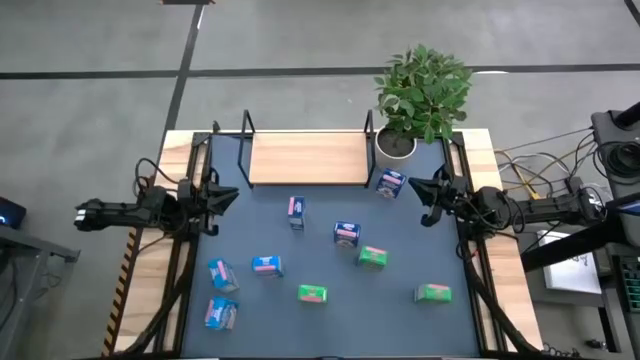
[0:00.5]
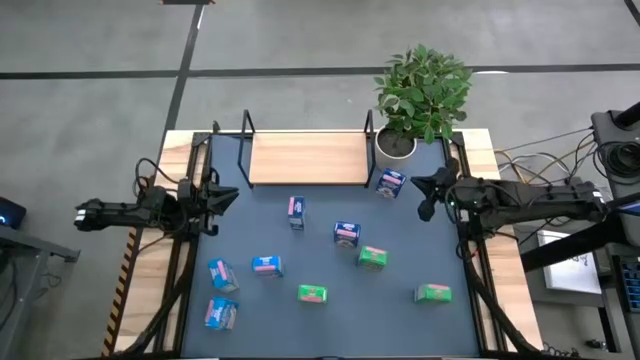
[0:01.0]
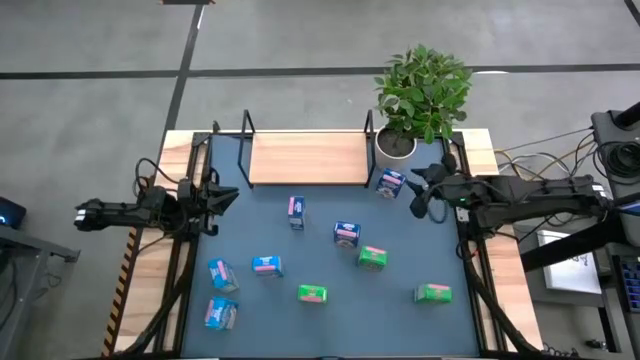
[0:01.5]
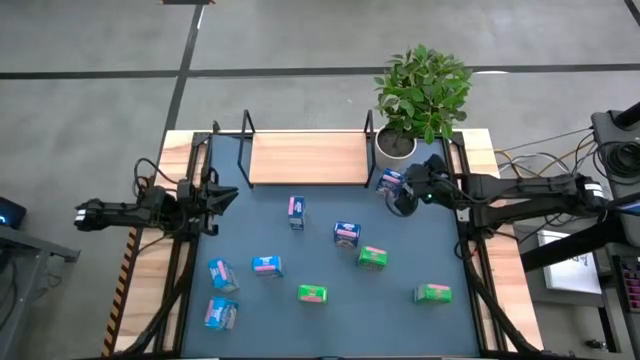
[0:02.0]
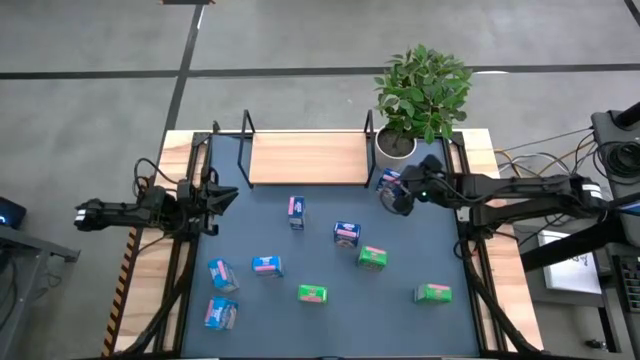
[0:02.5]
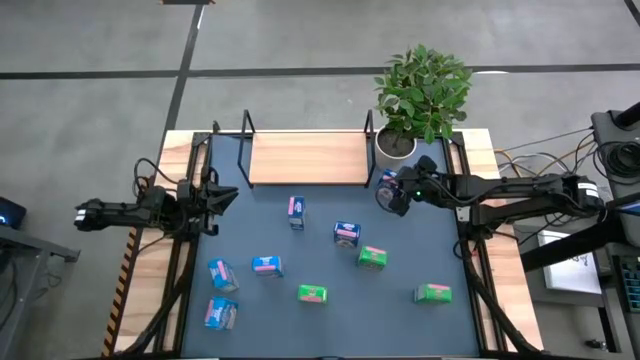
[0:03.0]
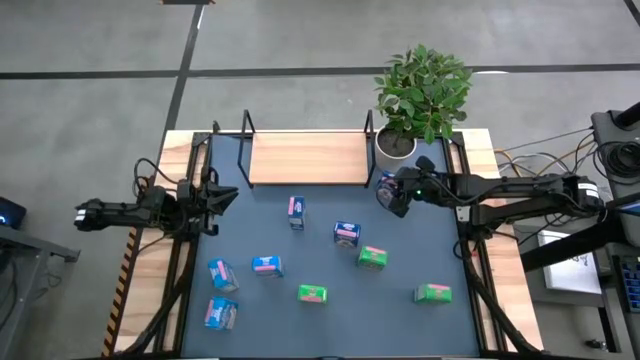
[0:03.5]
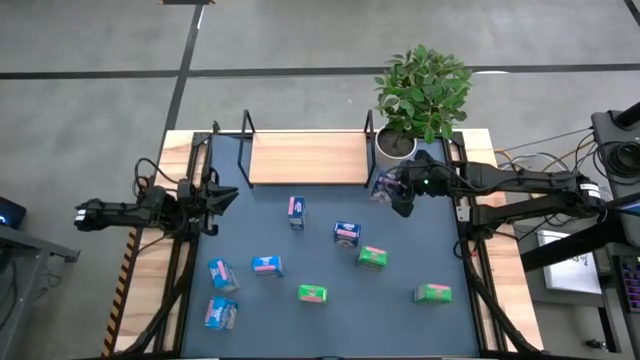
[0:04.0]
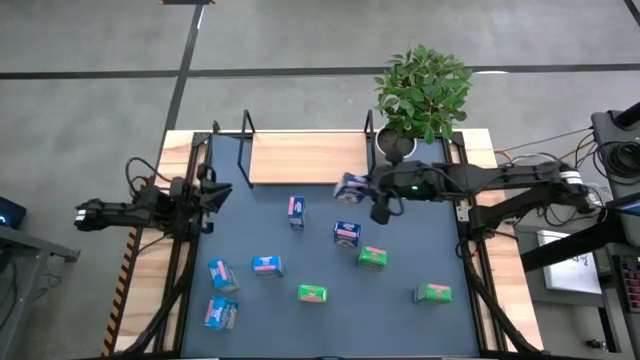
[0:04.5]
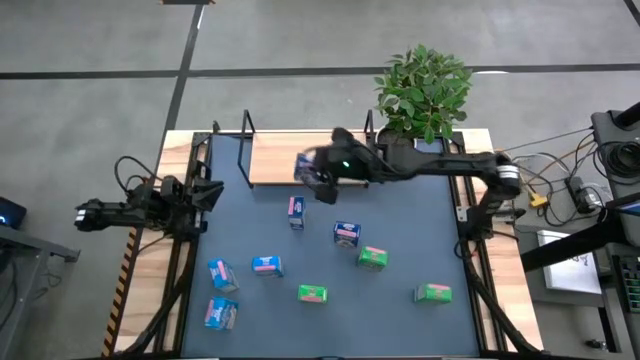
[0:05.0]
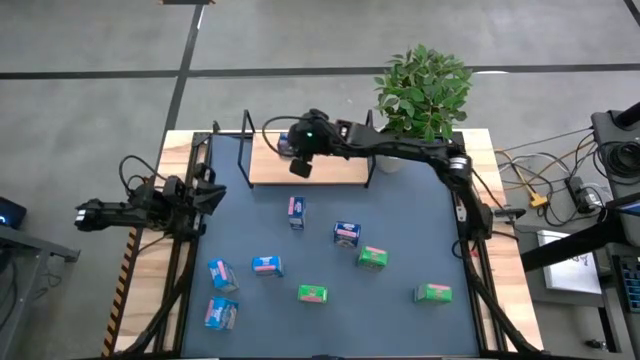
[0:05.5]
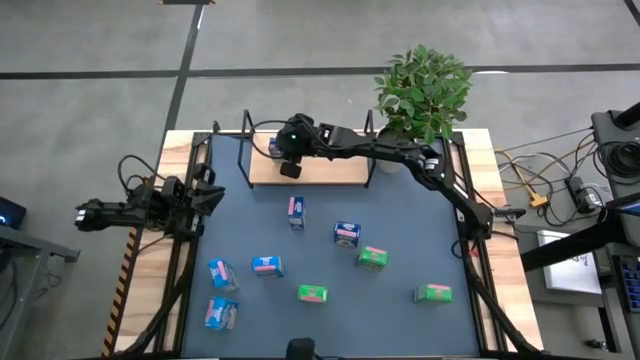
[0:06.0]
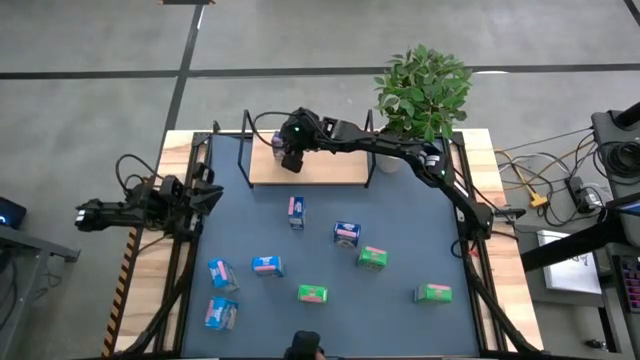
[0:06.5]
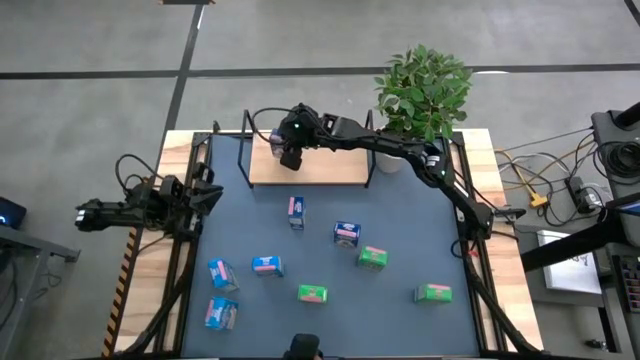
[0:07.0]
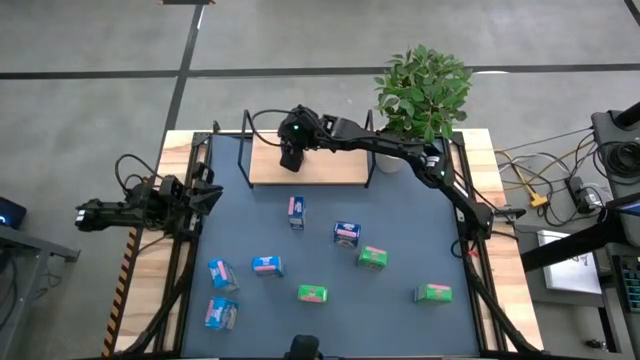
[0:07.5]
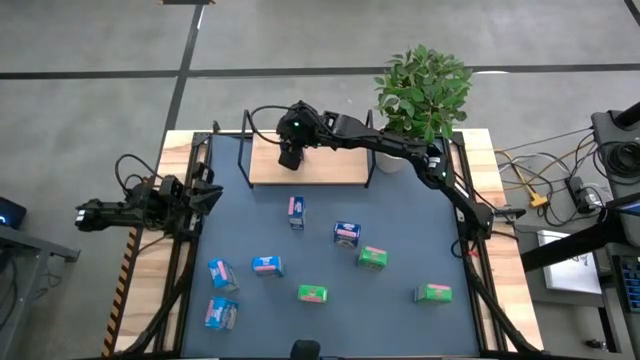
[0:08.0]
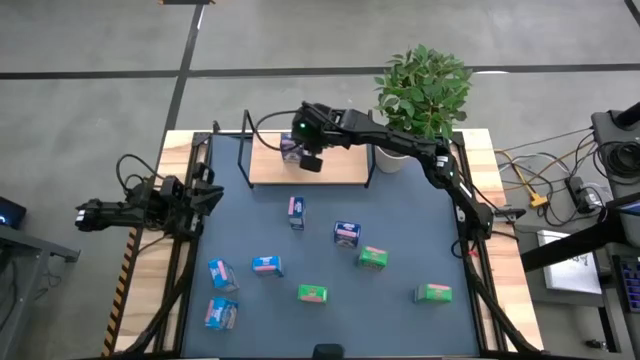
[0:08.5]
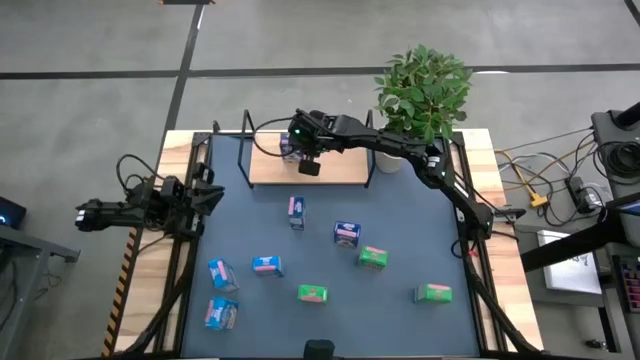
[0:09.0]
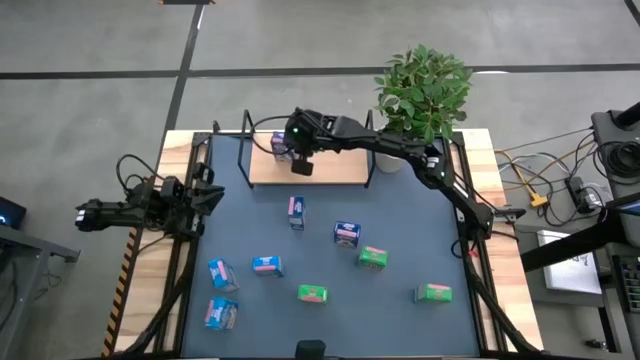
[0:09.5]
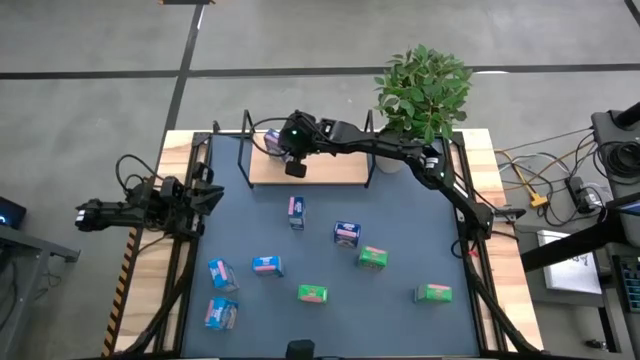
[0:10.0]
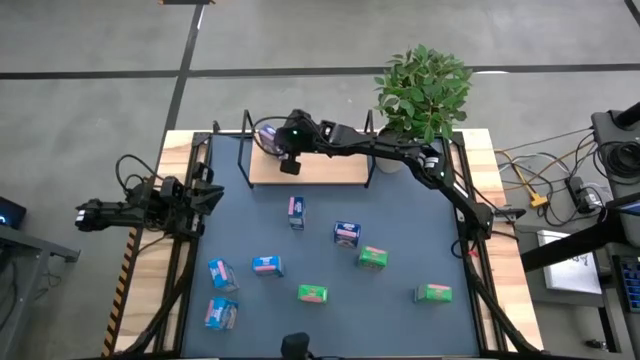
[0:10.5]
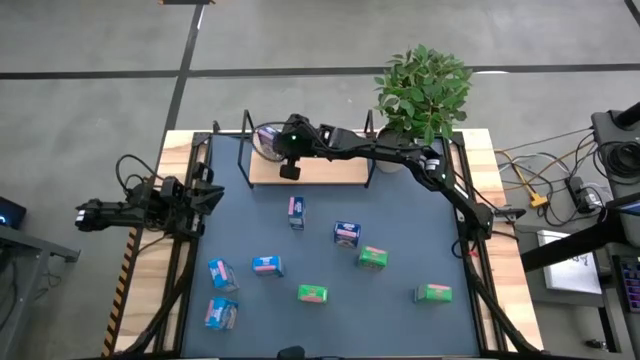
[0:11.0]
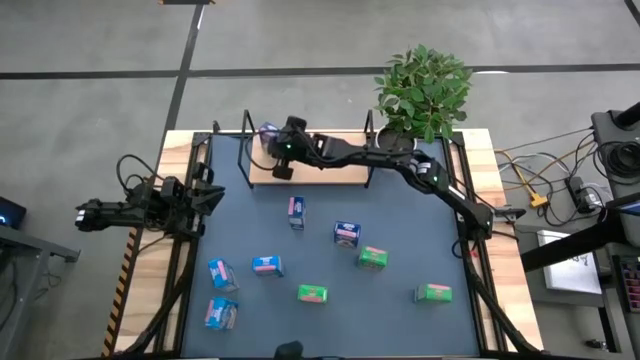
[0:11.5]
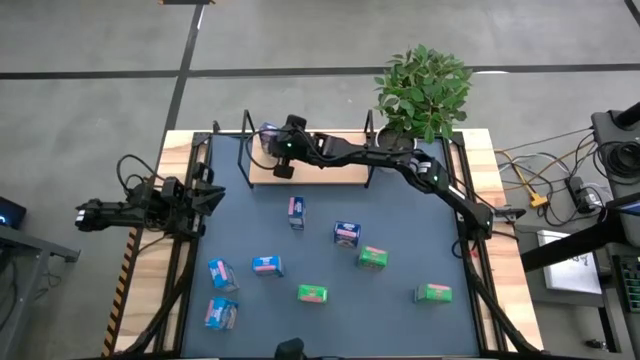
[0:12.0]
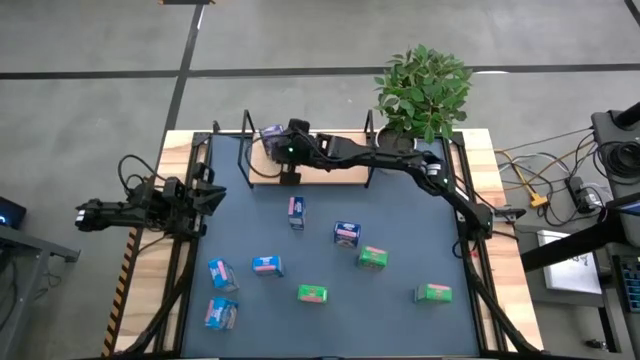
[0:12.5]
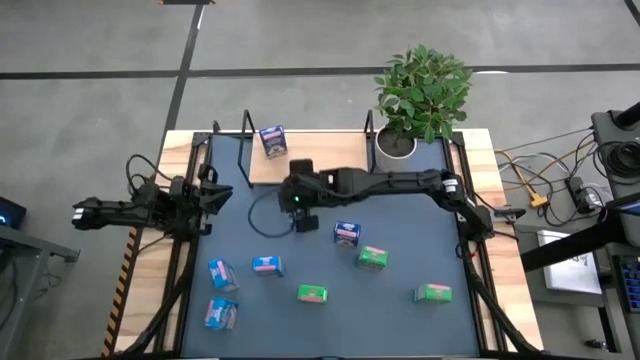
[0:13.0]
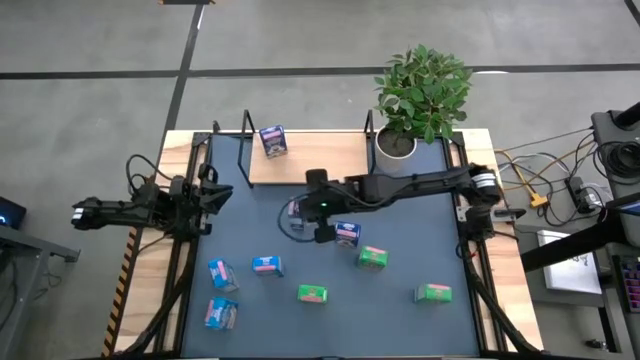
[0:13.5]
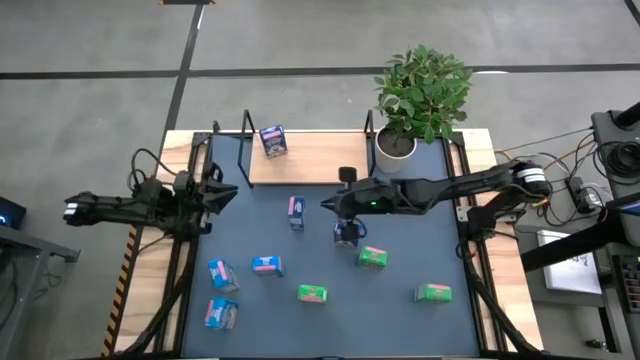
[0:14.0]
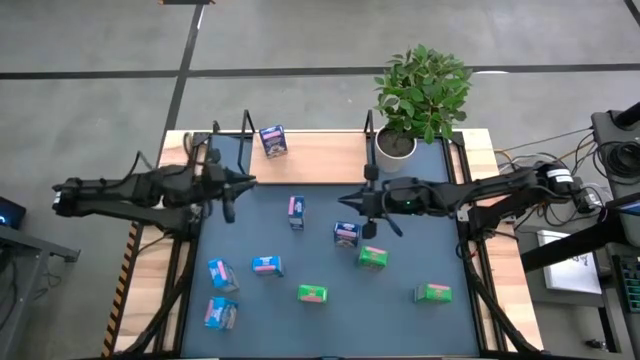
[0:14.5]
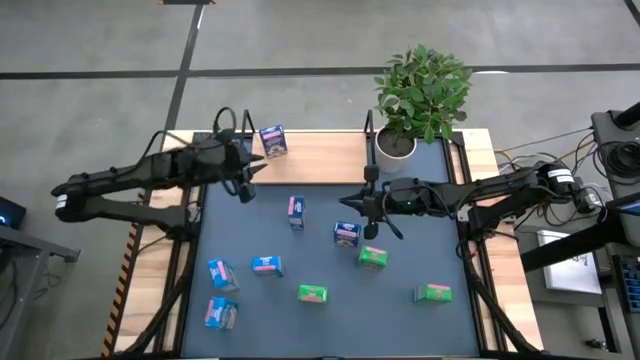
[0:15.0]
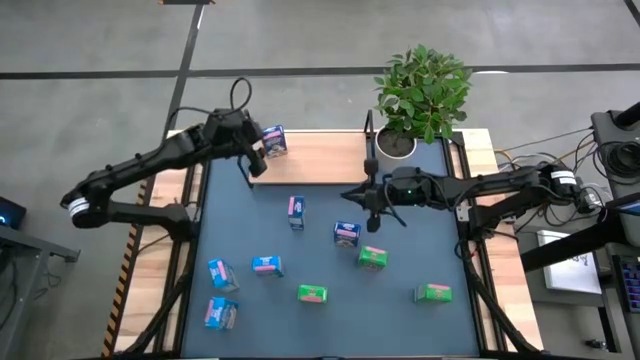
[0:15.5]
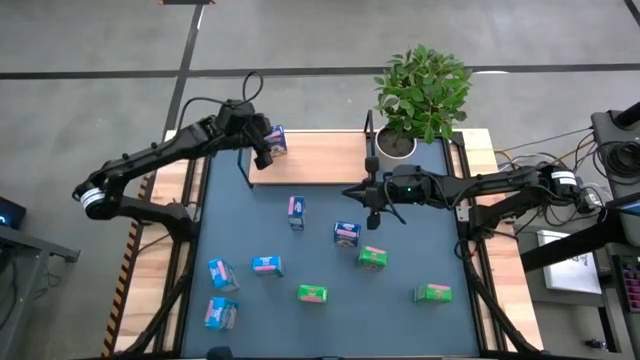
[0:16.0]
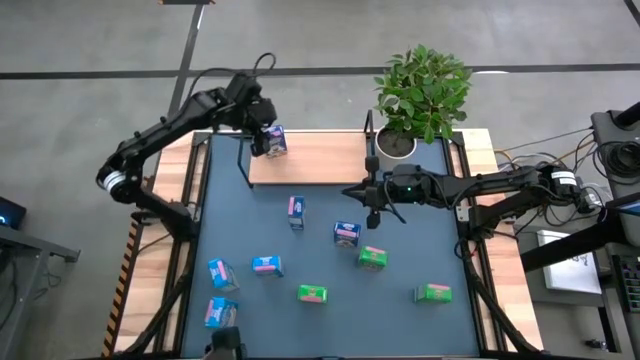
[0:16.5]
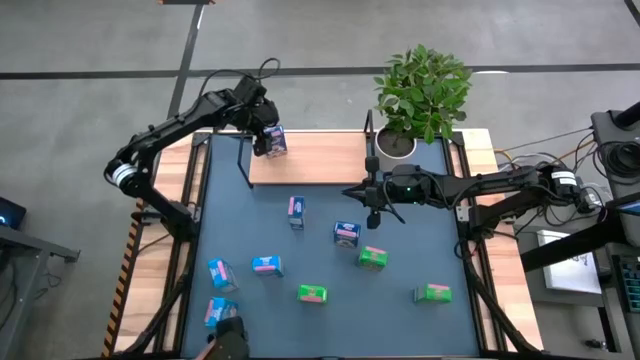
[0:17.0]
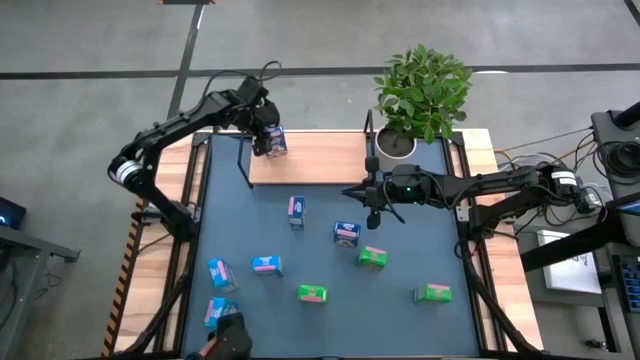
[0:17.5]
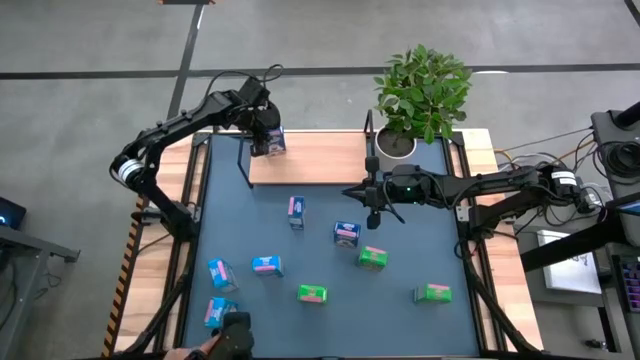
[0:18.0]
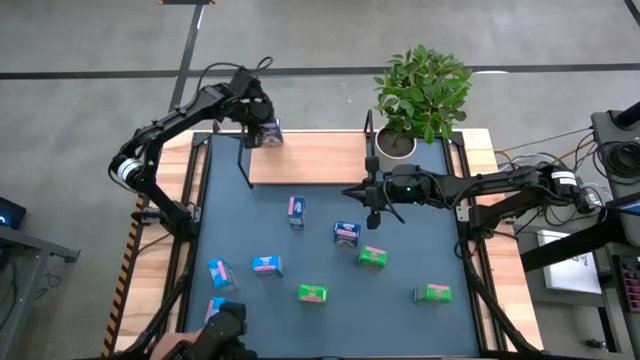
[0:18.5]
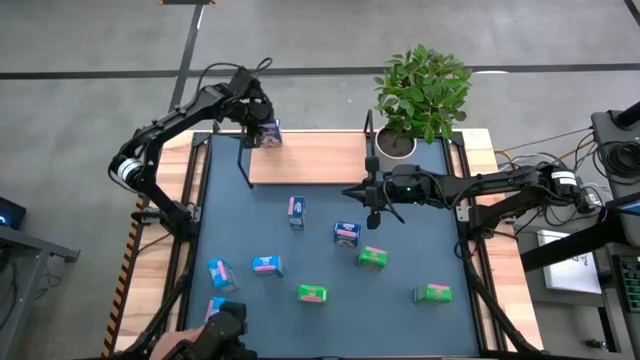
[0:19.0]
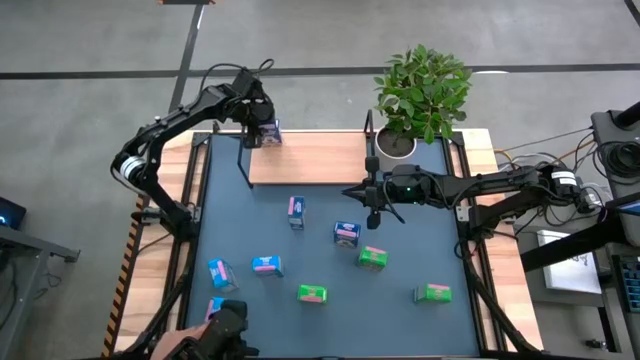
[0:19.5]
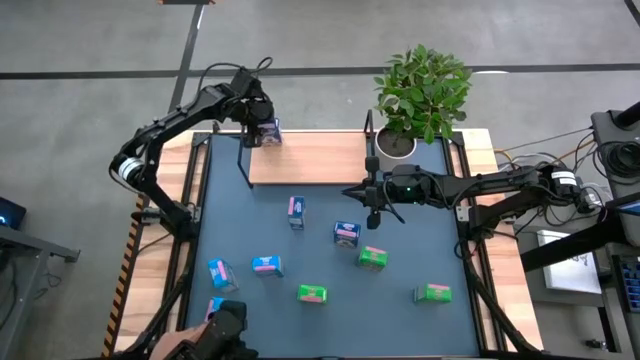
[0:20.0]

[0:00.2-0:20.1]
Task: Stack cereal on shelf
Put the top right blue cereal box on the shelf
